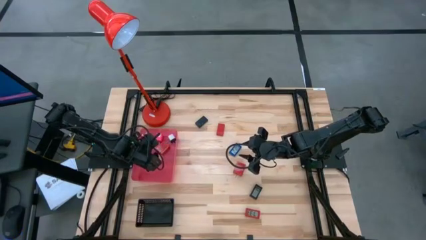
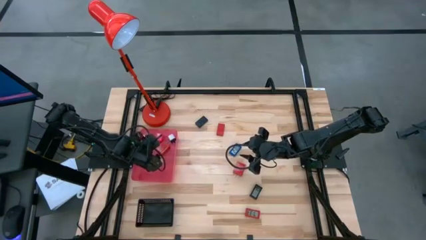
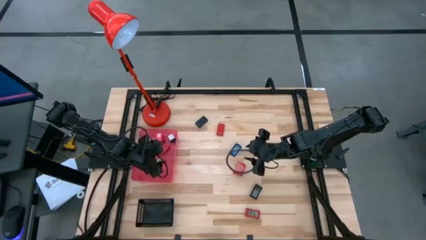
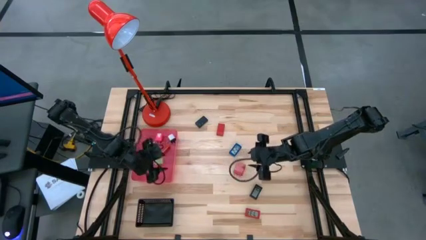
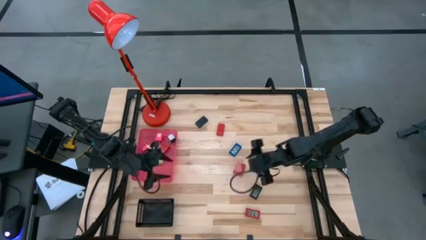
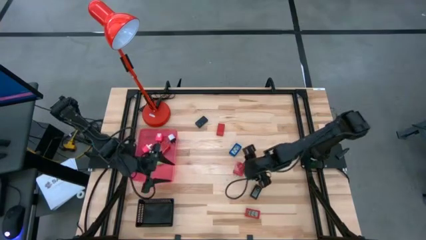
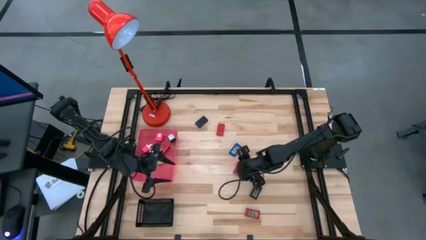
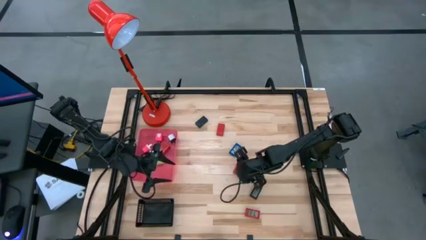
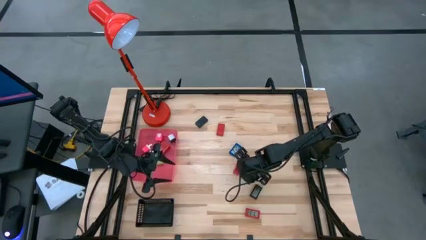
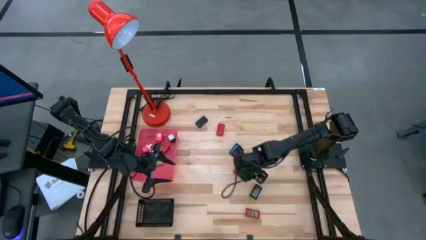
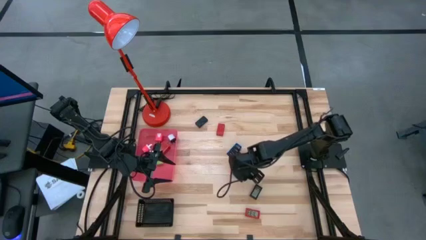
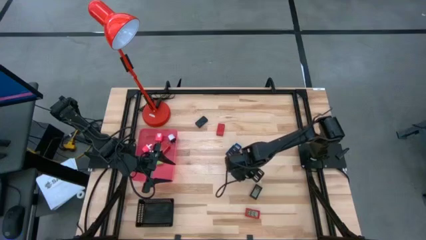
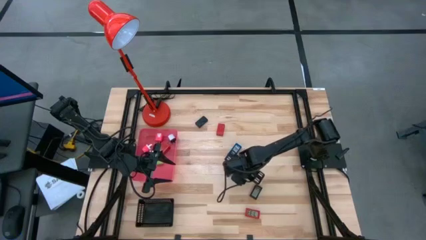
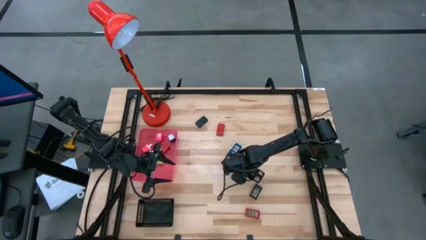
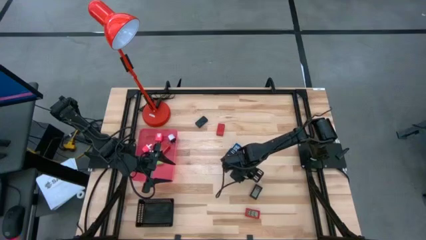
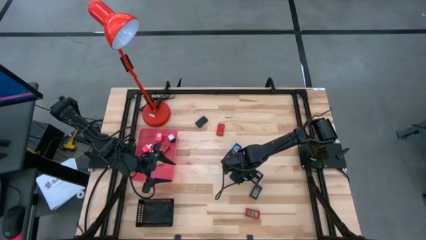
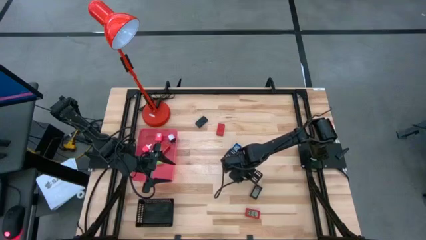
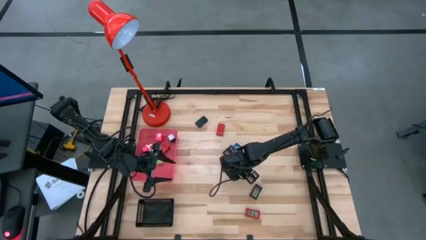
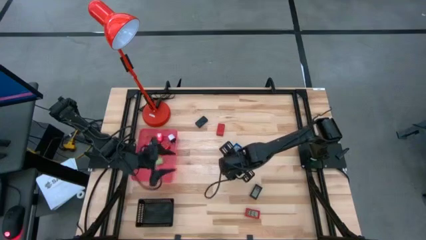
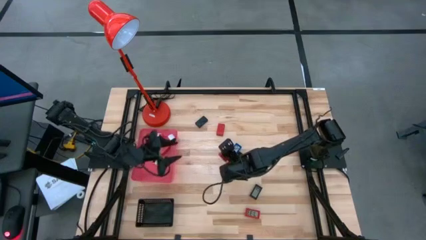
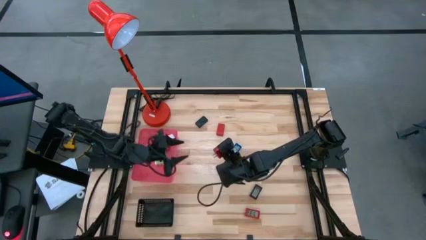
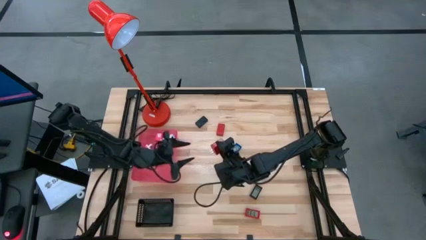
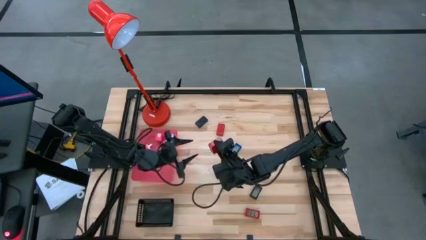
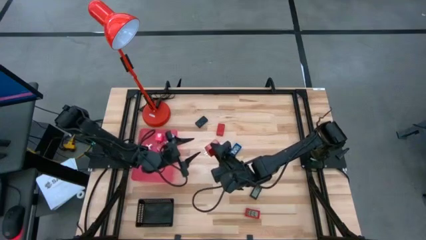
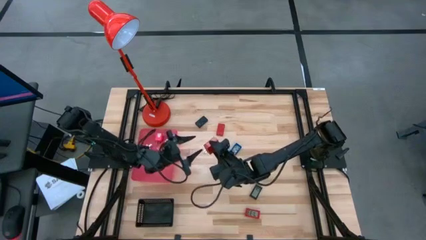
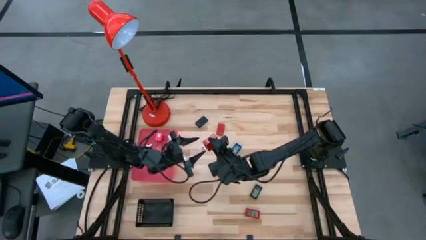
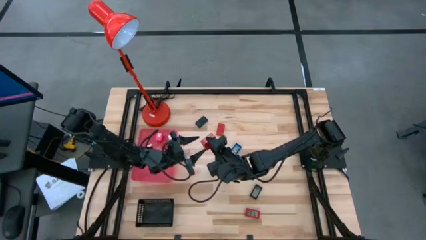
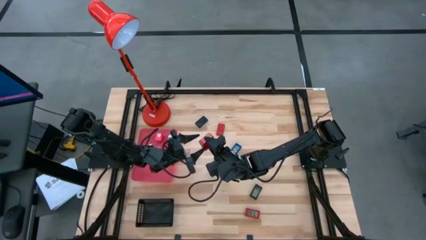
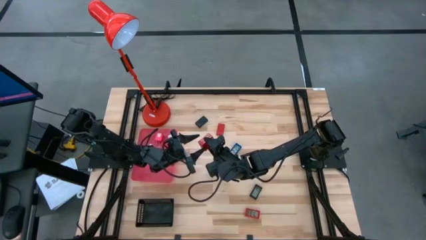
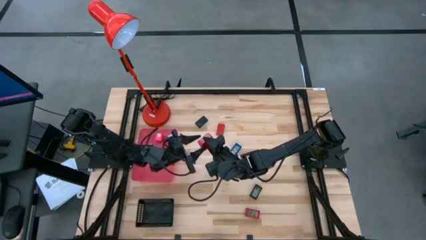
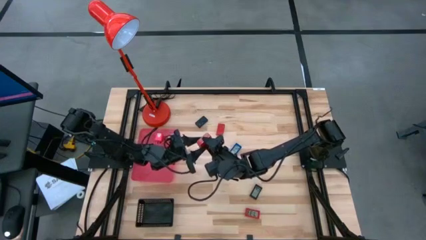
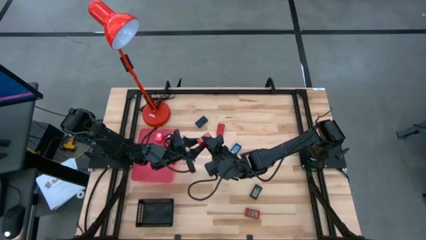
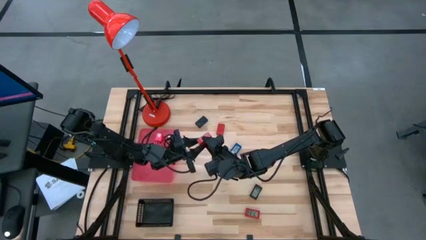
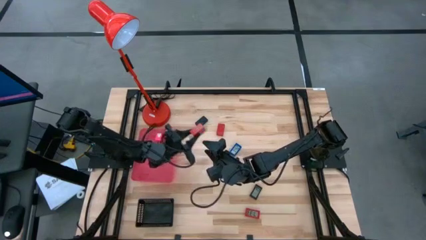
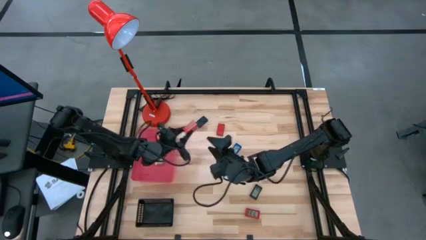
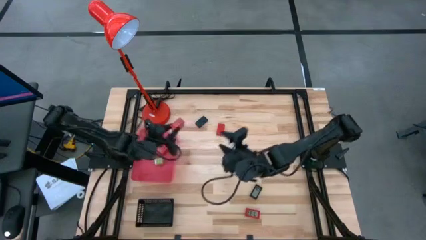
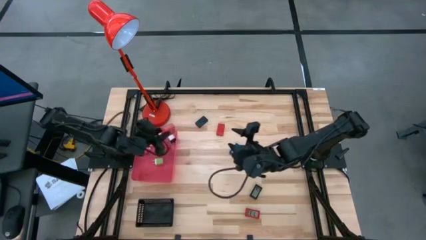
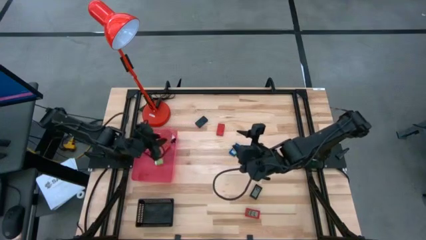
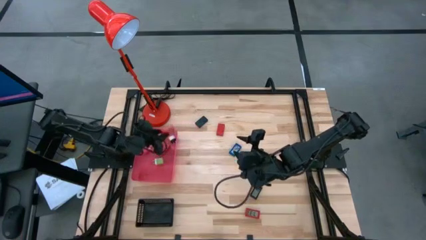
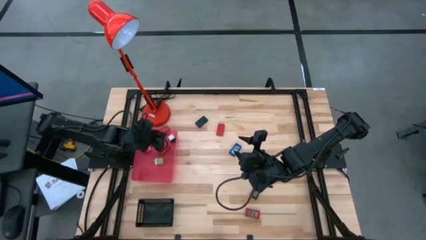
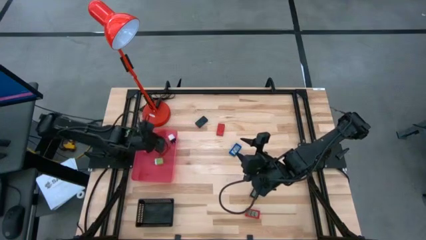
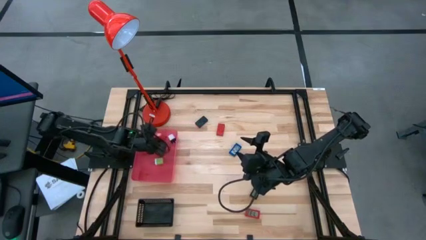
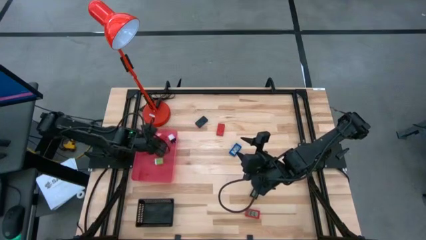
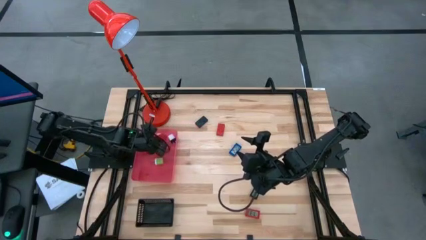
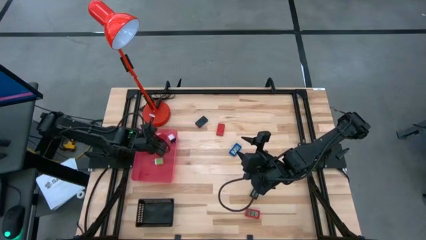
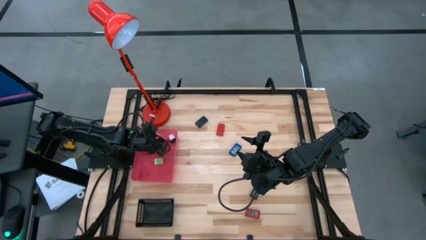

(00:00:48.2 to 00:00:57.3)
Task: Pick & Place Office items
Put the red charger adapter into the red bin

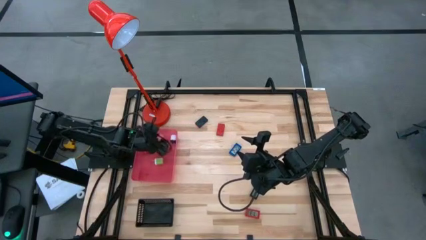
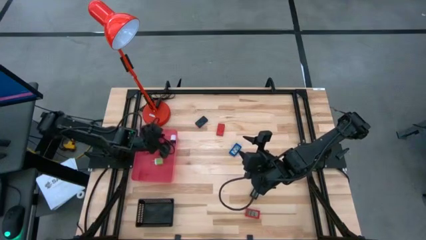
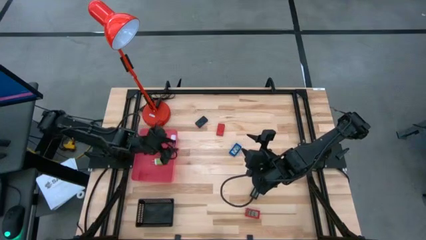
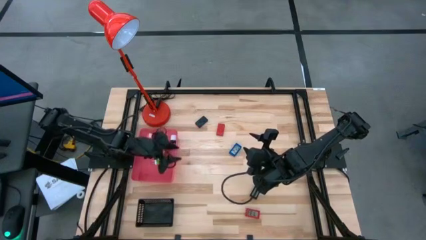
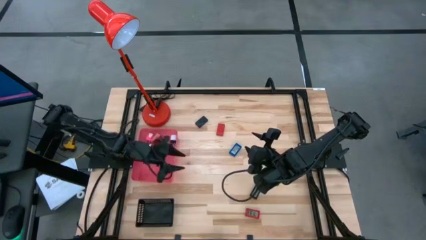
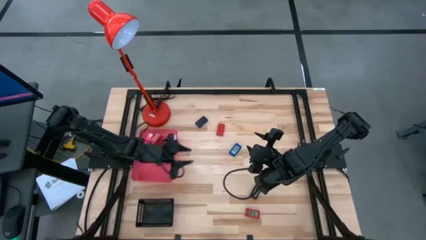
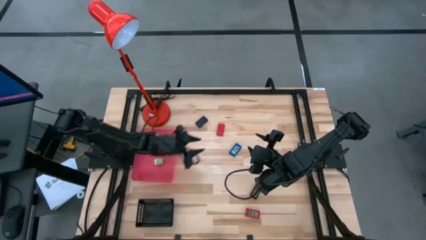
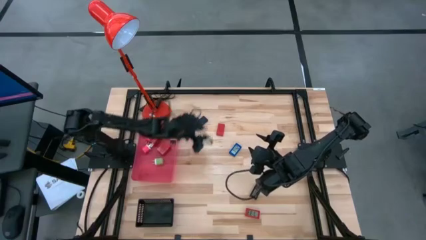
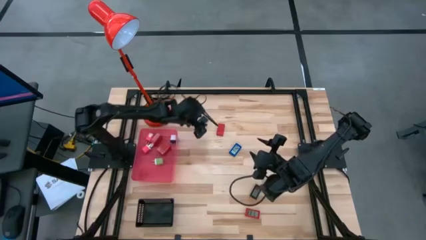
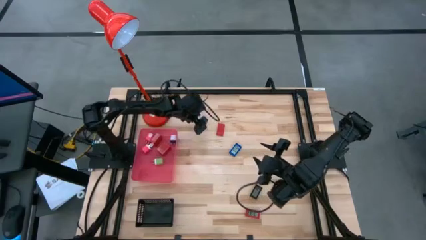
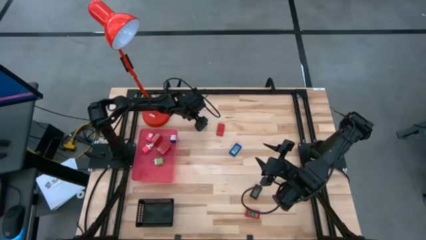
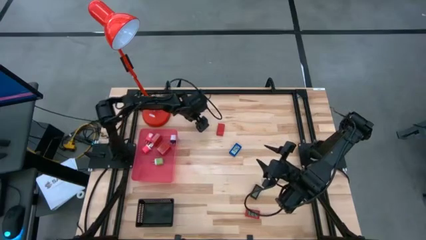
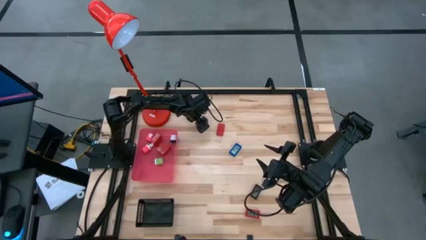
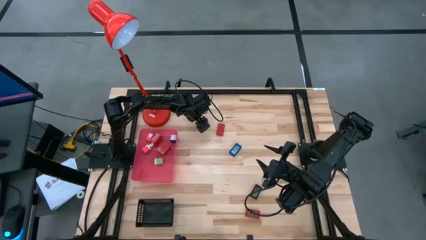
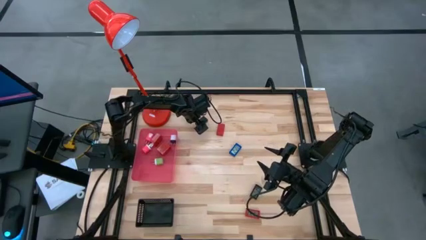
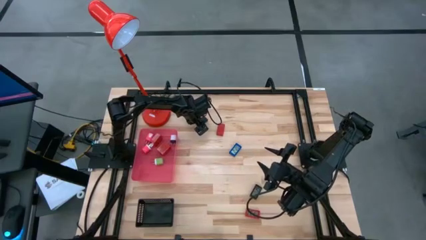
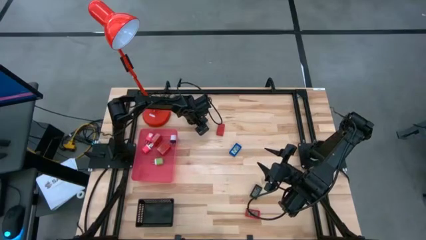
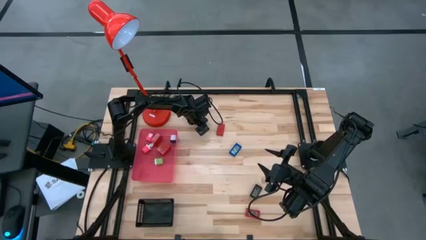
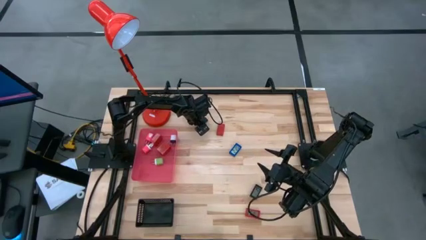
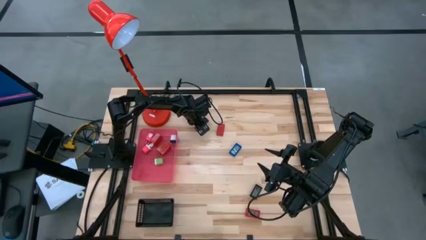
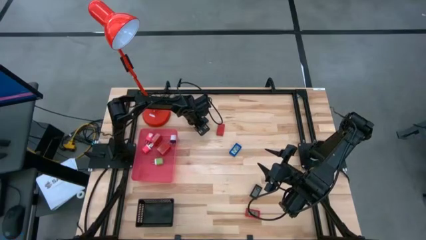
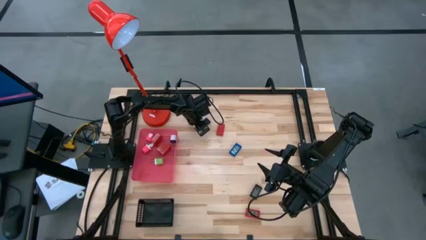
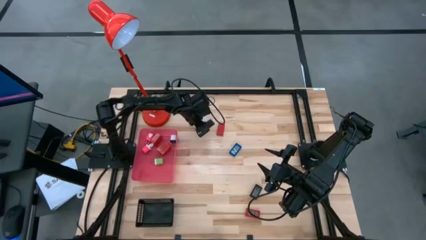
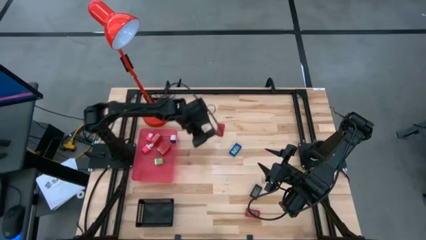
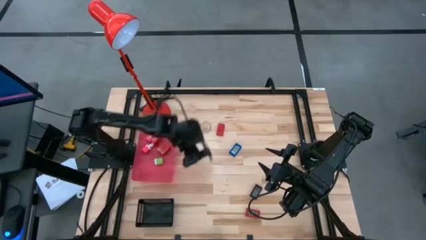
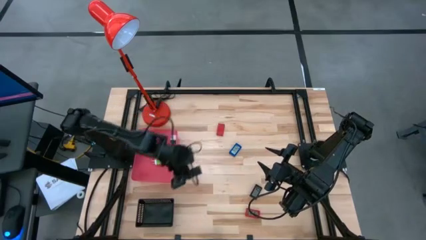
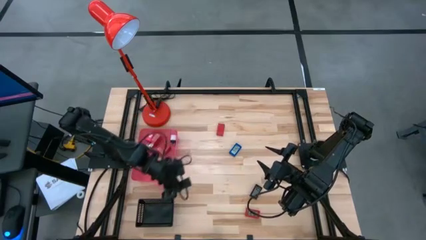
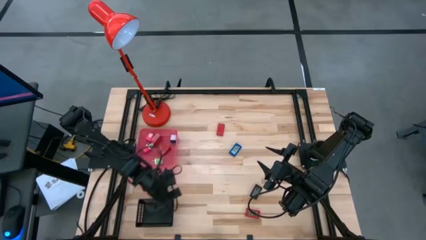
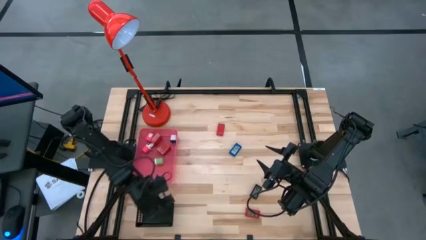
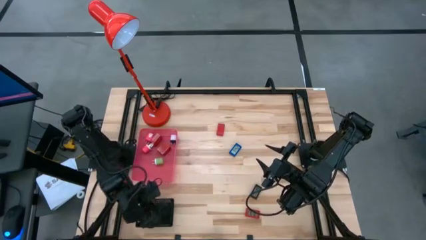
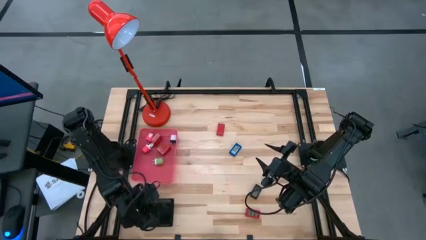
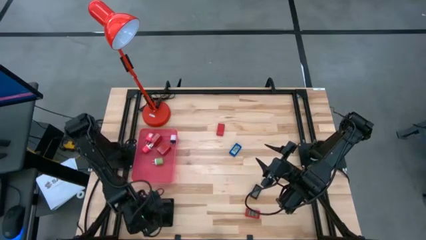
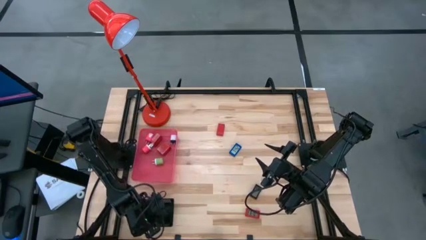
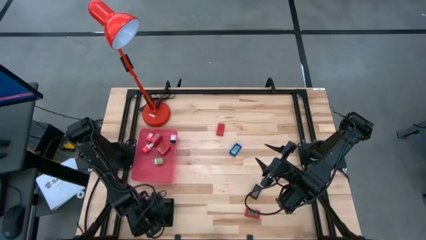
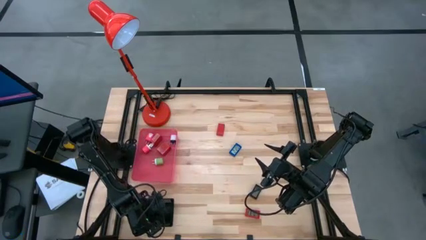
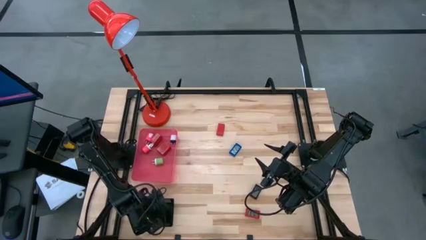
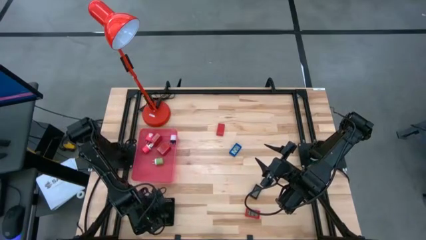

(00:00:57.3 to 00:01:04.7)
Put the top black digital timer into the black bin
